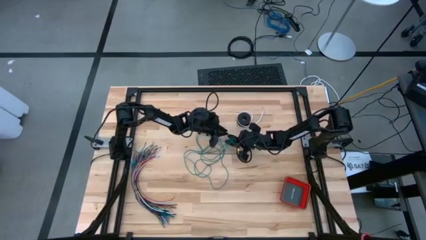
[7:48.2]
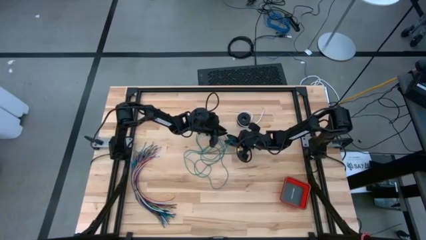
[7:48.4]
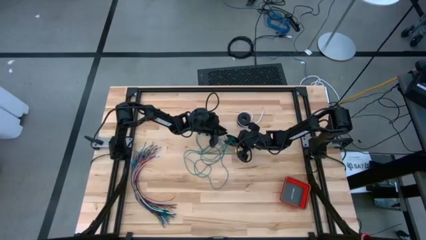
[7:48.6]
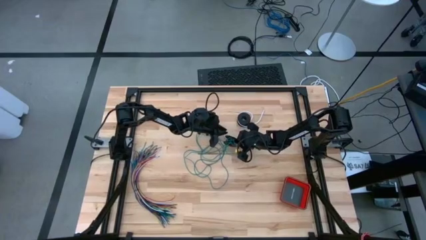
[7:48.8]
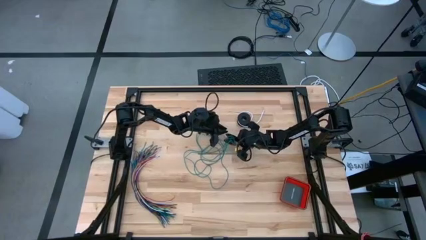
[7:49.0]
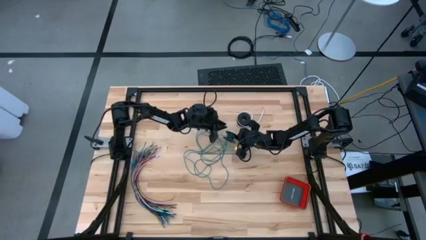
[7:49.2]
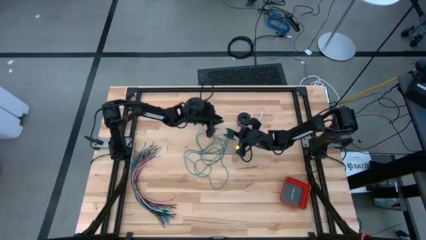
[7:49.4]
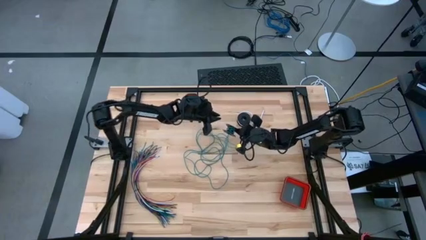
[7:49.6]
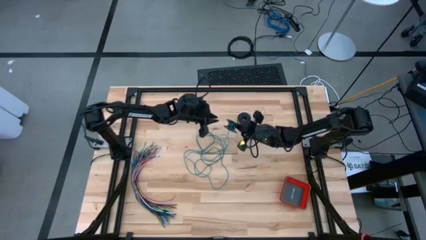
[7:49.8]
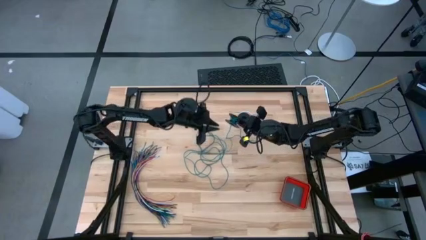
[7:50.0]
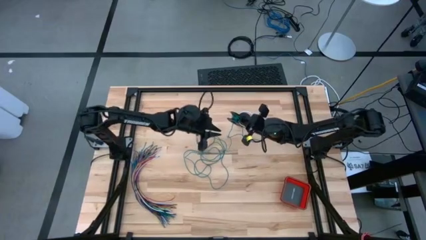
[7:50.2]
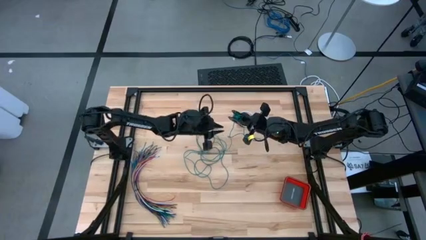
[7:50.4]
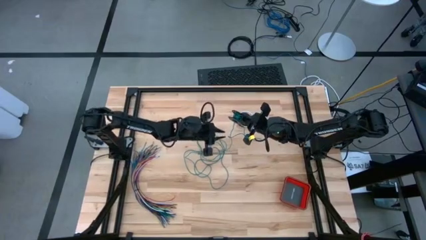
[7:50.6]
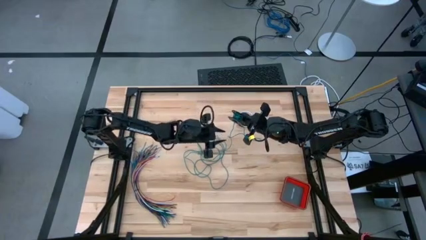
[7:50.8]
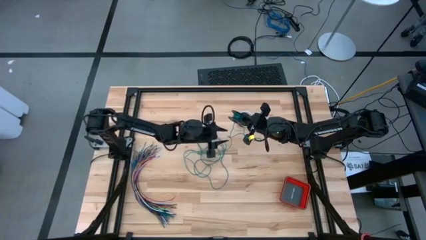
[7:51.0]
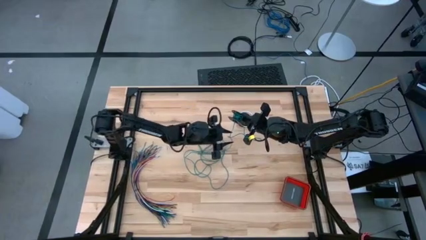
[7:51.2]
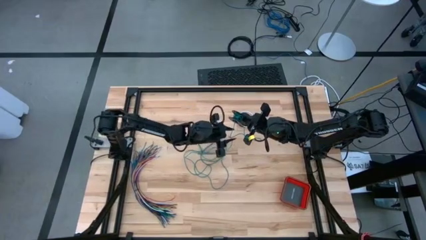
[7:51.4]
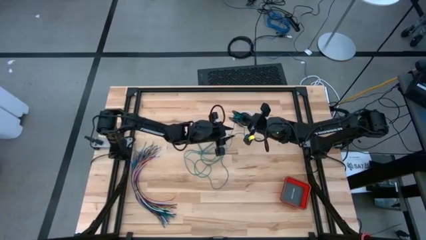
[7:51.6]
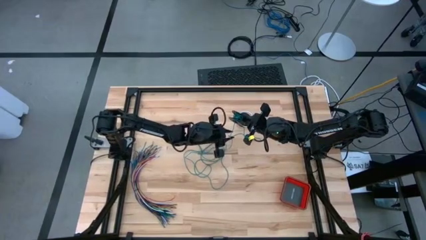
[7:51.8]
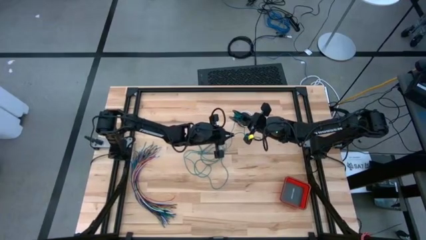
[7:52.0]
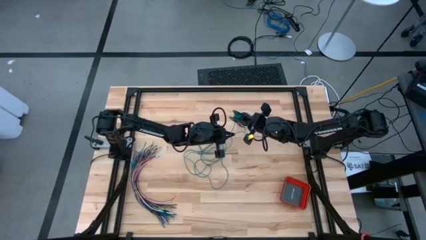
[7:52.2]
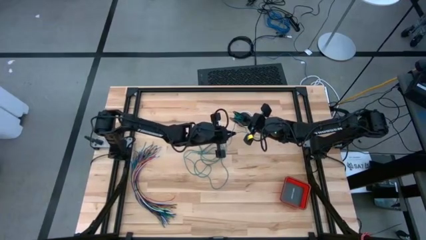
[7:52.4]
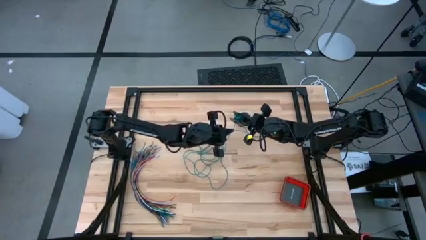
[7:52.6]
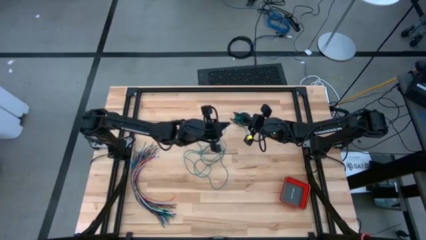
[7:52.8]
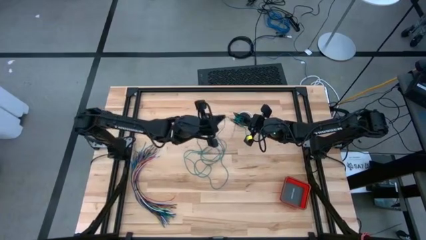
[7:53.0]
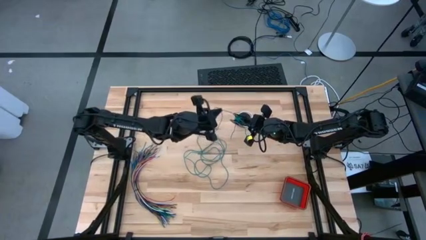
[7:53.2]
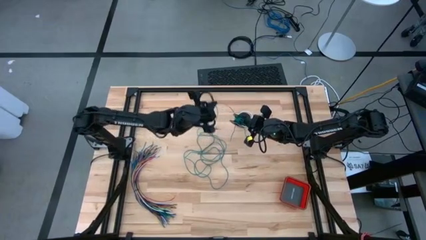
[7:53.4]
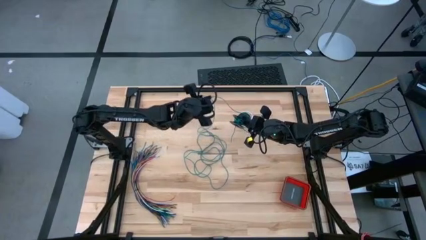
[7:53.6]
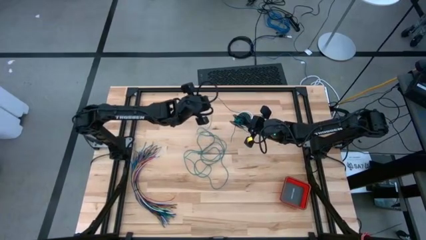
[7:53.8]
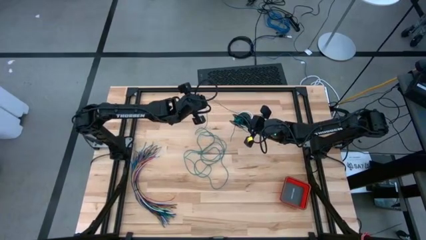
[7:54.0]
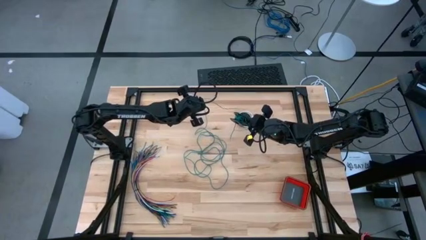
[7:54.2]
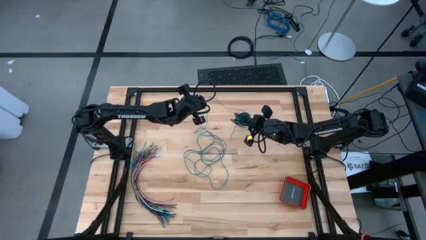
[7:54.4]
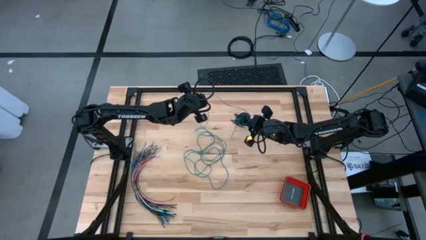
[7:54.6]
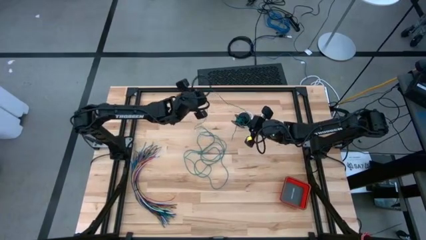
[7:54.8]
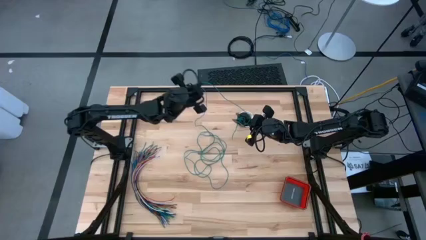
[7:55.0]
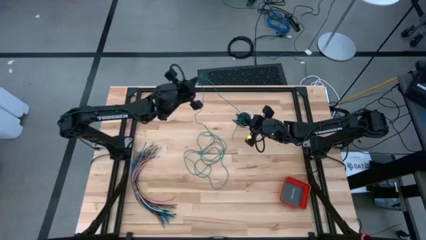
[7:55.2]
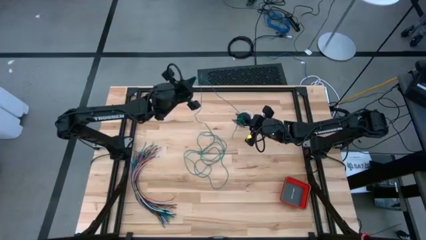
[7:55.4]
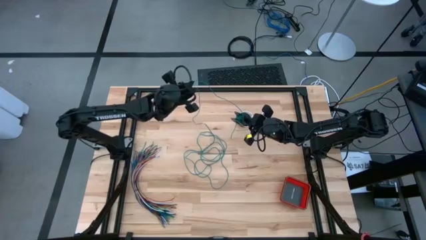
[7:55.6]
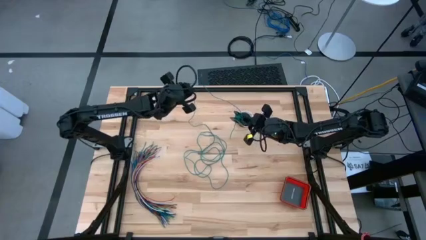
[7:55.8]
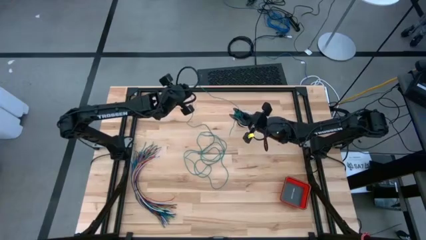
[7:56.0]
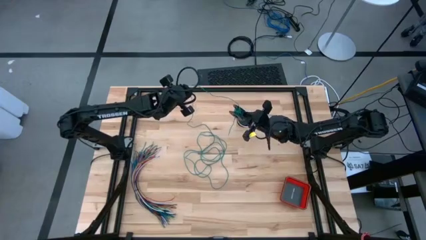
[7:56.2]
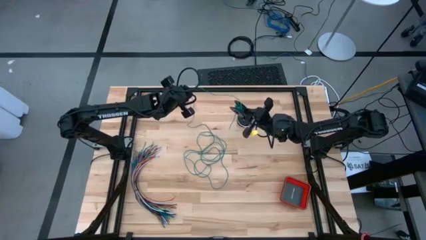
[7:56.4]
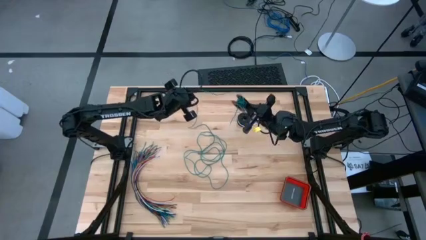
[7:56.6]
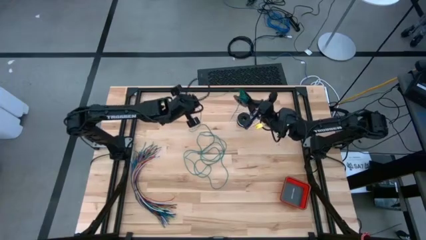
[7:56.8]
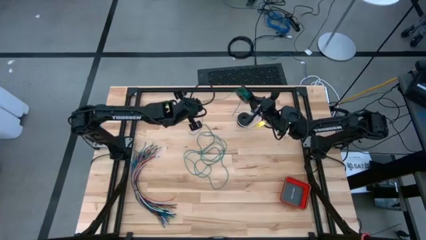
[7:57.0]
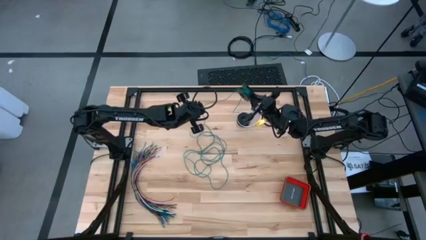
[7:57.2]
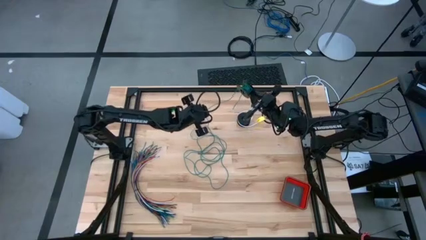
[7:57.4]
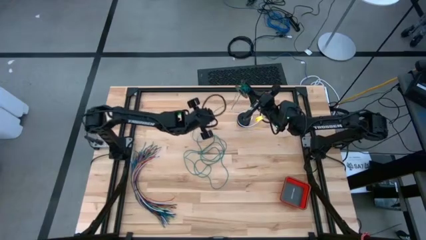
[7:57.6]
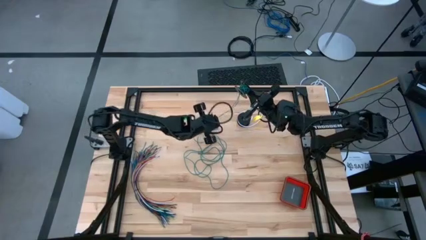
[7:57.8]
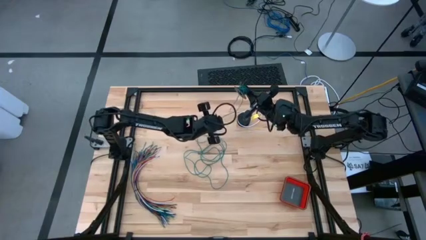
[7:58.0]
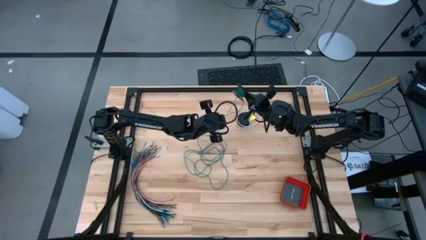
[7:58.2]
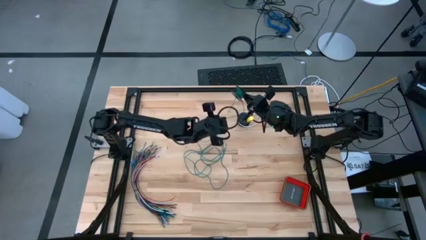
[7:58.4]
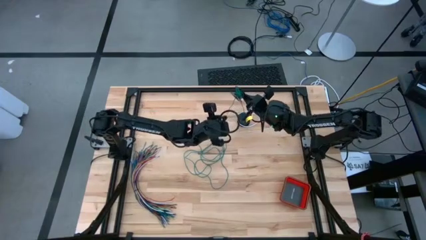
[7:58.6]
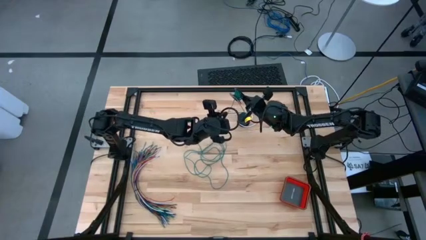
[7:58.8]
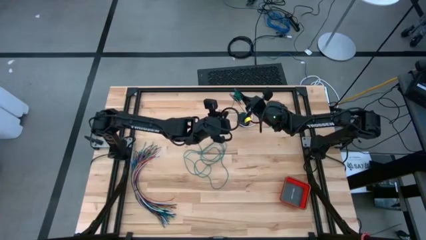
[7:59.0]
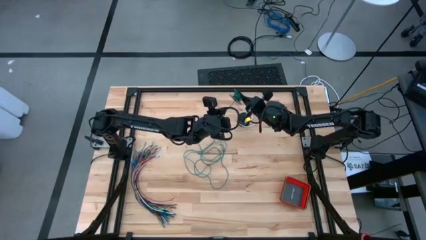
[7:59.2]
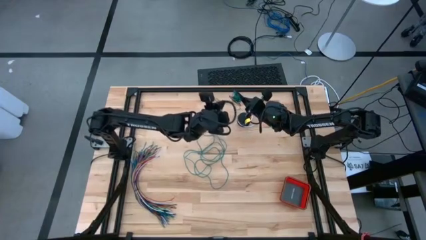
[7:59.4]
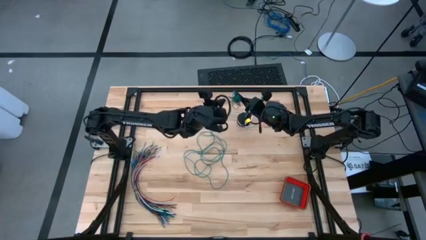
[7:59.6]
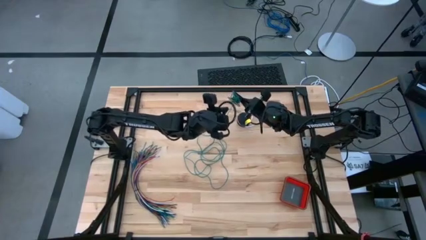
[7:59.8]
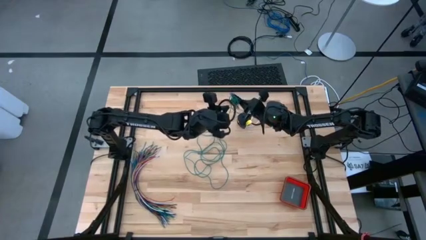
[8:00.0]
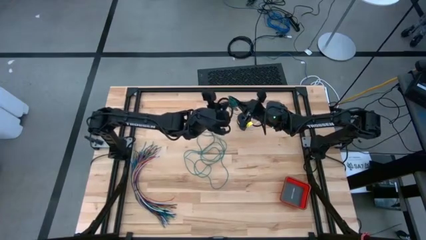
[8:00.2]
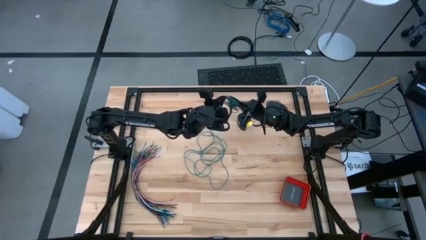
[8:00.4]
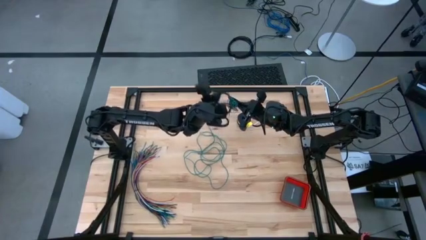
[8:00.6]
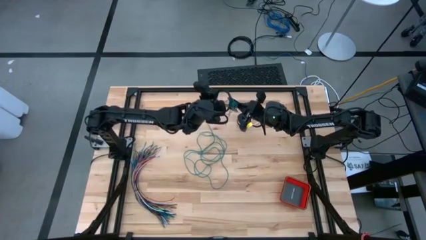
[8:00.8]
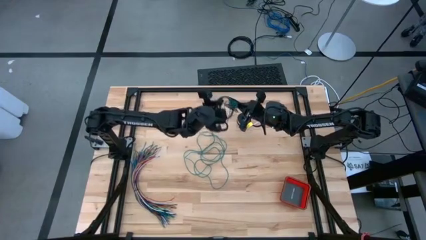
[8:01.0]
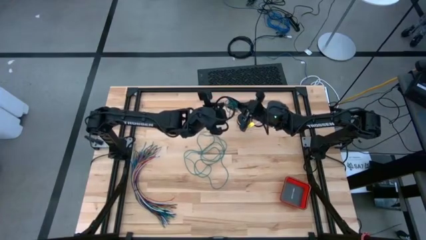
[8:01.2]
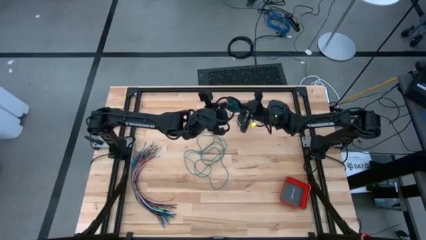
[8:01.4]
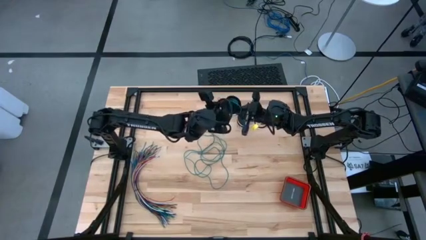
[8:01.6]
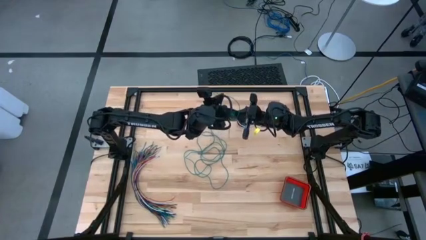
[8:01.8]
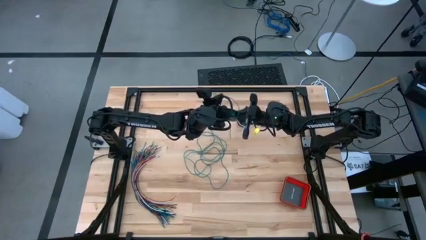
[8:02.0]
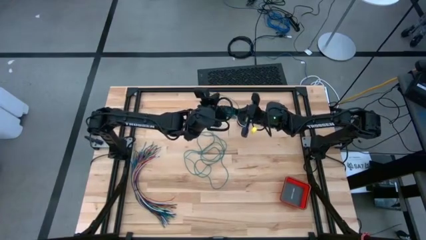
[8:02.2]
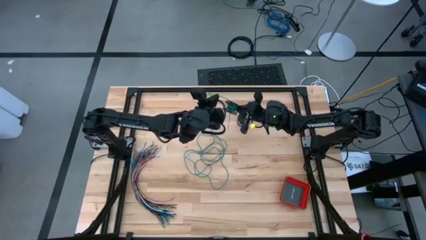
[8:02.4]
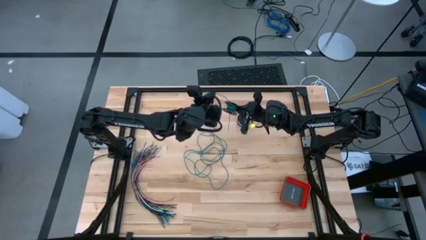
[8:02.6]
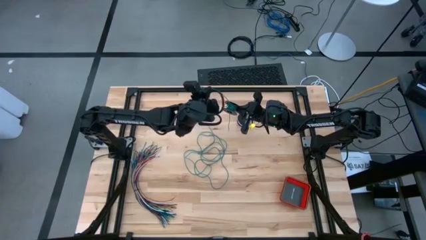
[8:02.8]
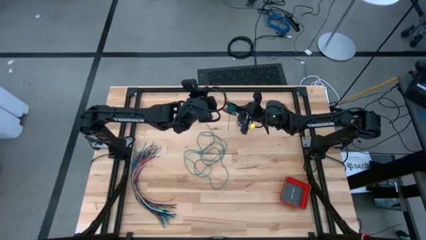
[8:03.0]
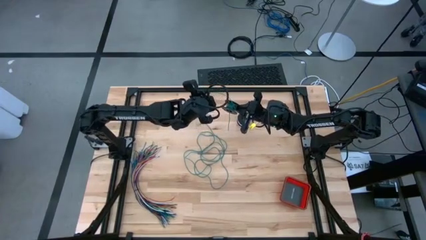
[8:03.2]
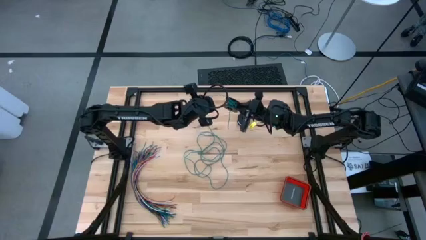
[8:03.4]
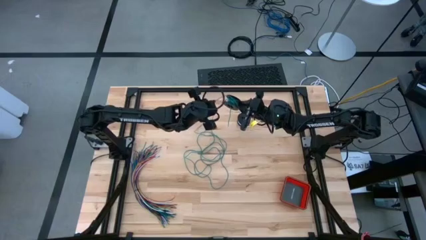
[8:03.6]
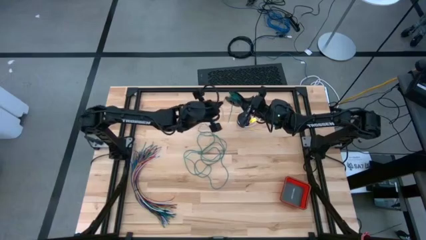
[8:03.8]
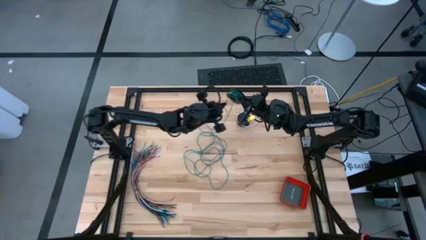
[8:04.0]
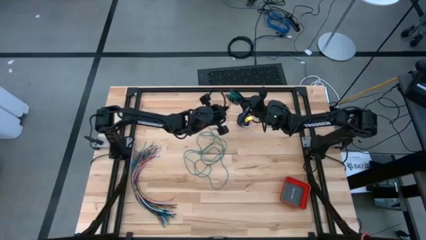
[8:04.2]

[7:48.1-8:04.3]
Task: Coil cords
Coil the green wire onto the spool
